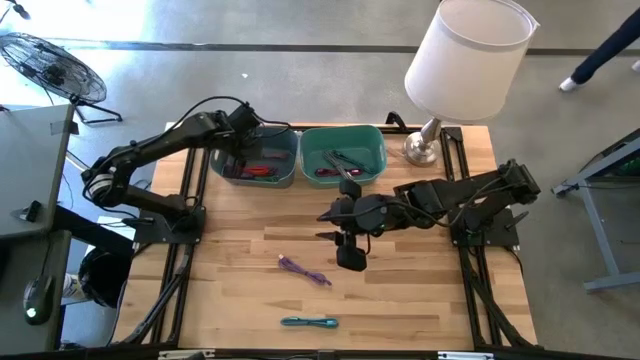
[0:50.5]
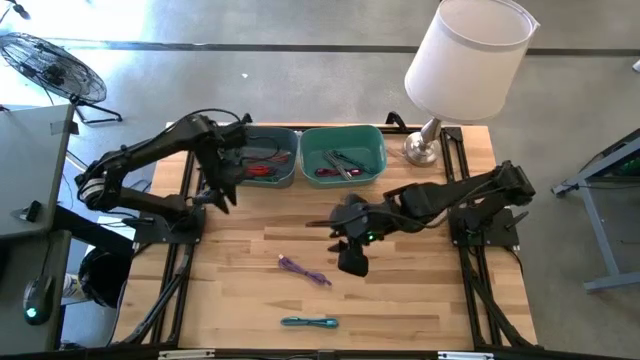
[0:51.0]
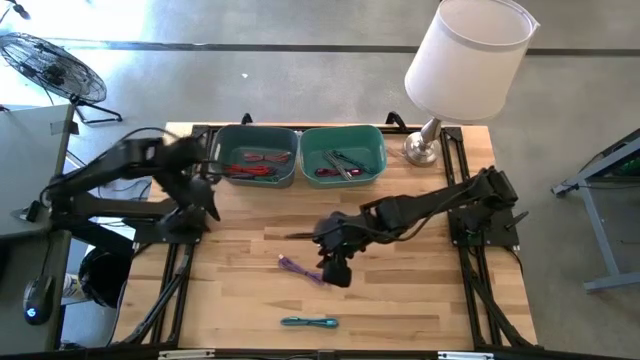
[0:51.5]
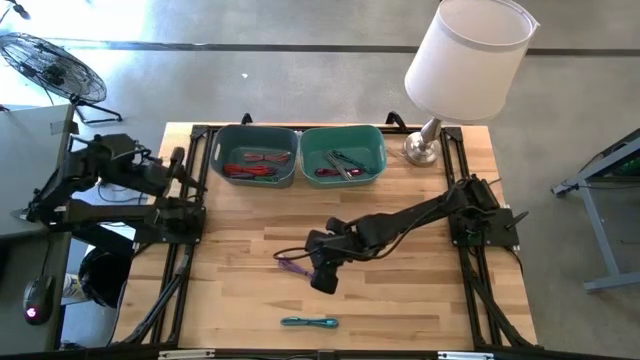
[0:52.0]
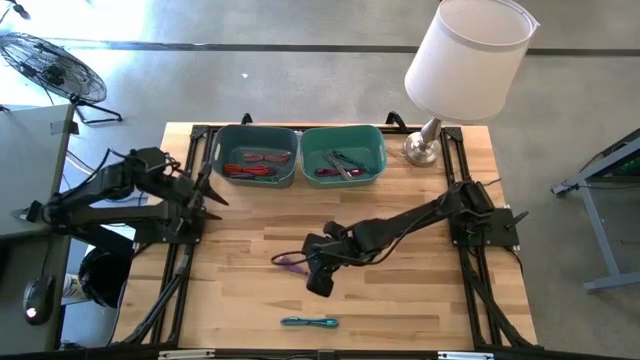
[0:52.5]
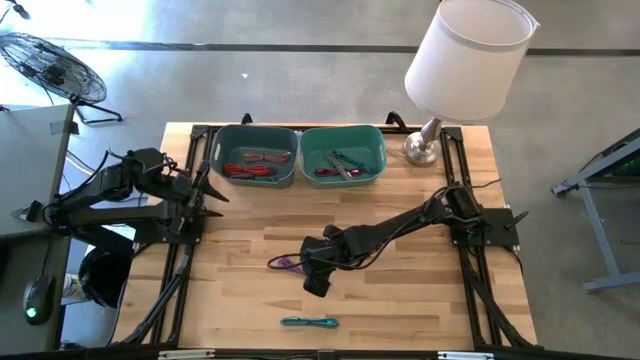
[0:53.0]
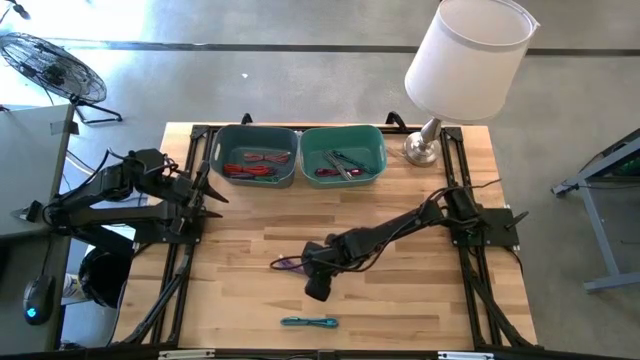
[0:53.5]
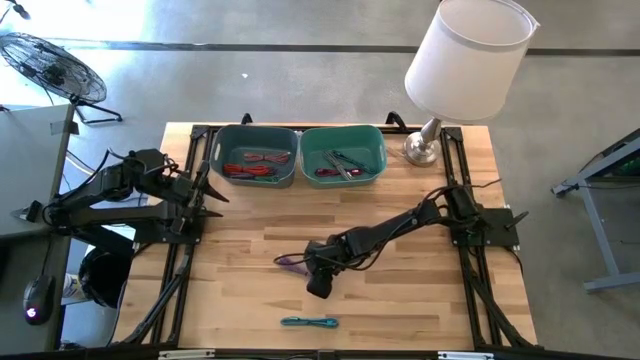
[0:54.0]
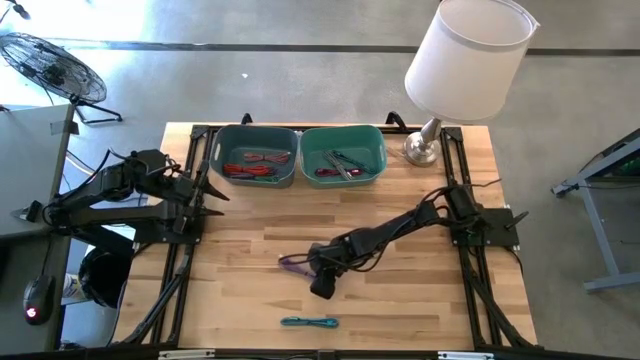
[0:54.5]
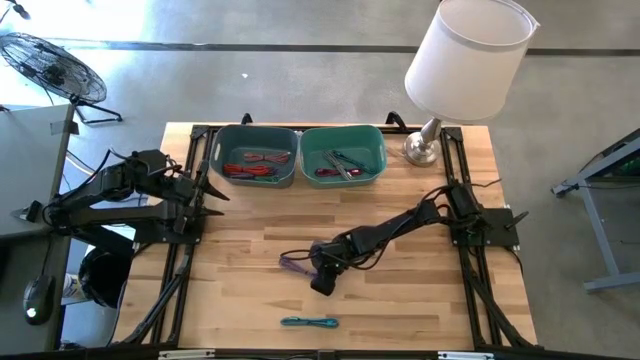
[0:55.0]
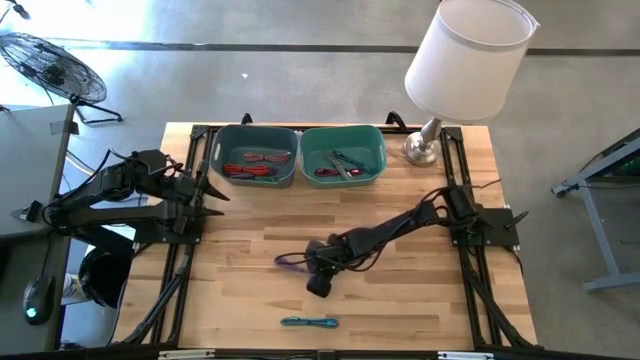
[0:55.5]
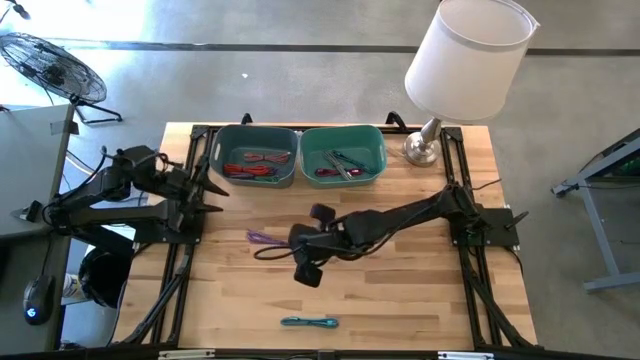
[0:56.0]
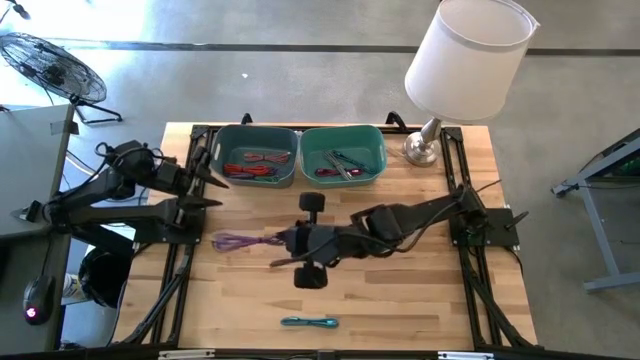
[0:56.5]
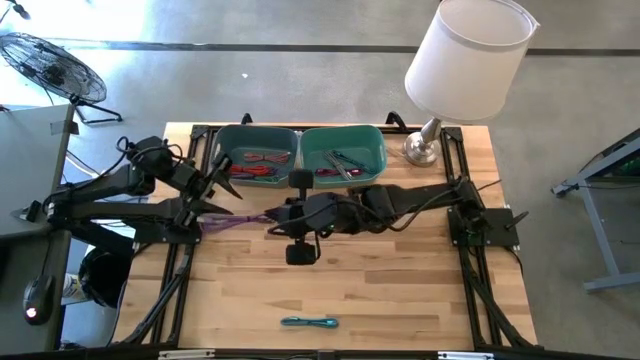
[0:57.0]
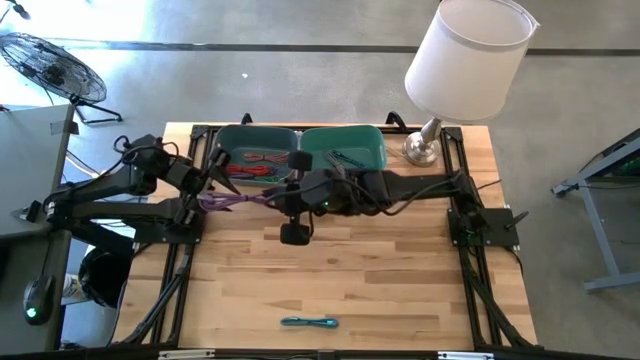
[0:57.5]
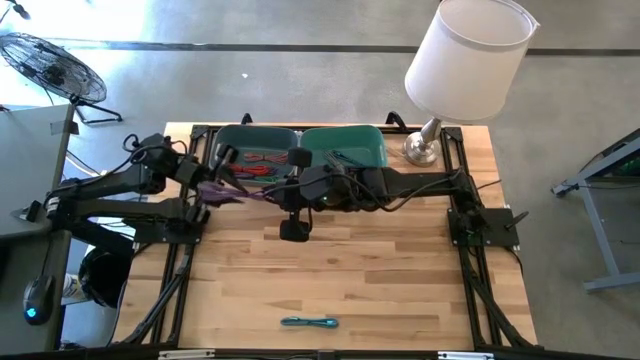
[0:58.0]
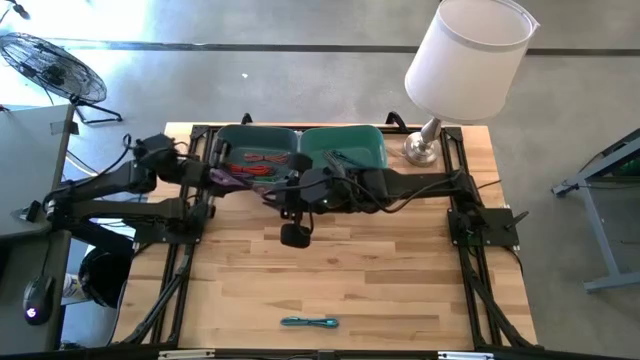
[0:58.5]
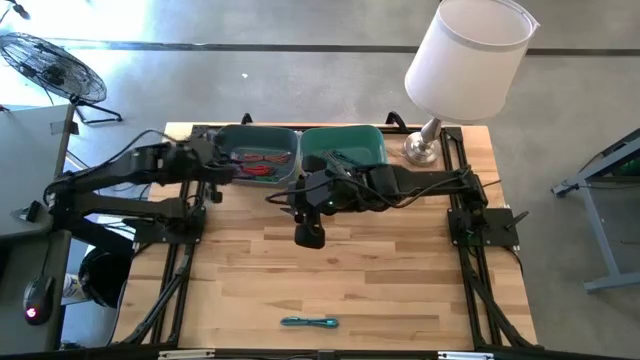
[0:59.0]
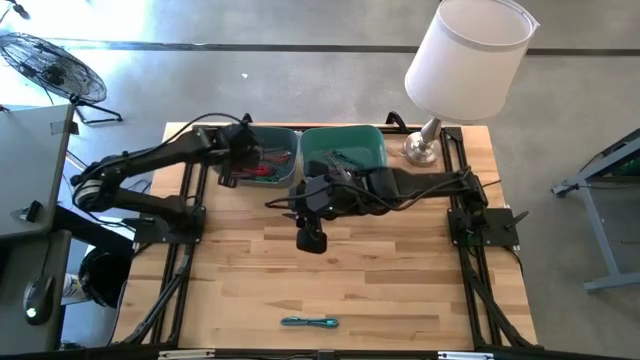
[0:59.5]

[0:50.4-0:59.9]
Task: Pick & Place USB Port
Put the purple charger cable into the blue bin

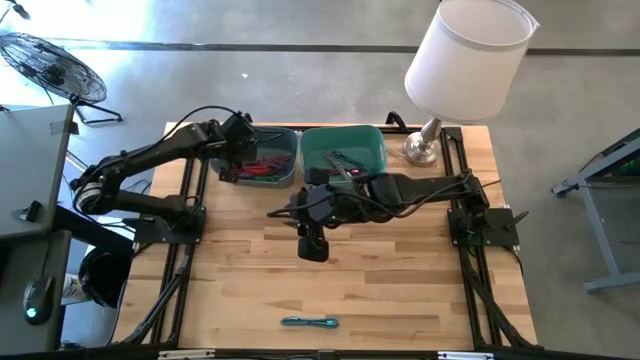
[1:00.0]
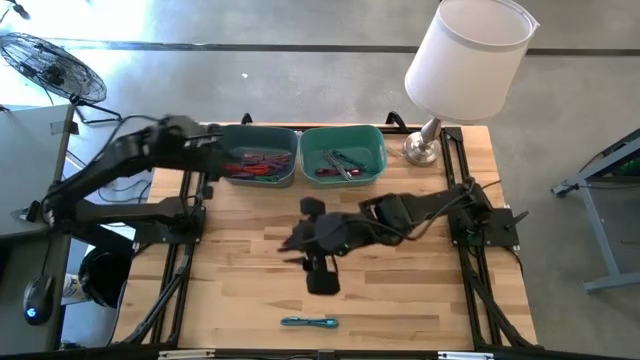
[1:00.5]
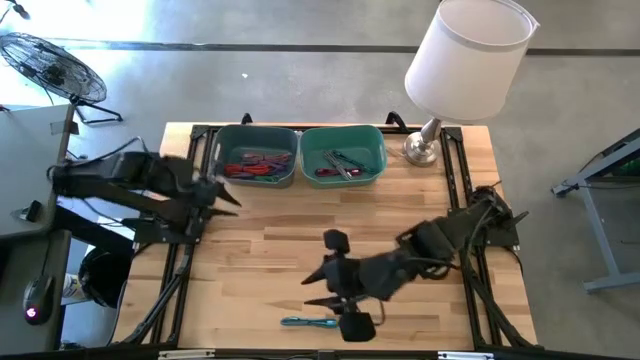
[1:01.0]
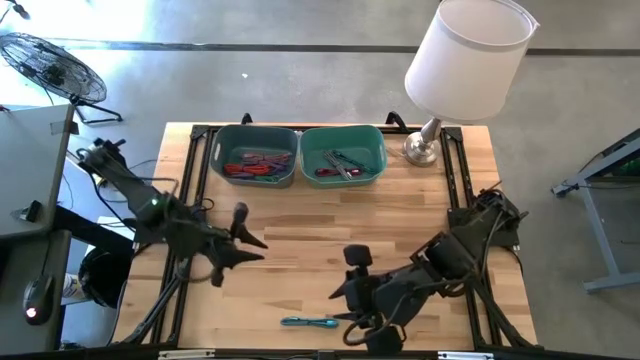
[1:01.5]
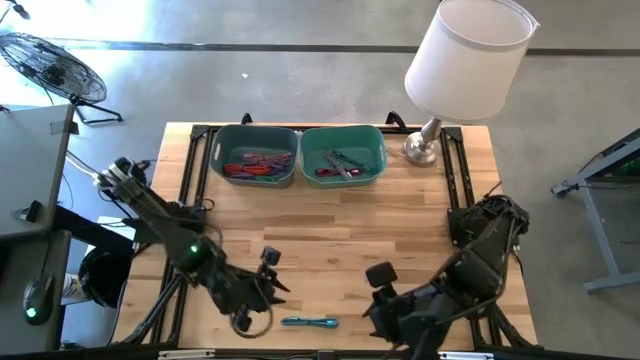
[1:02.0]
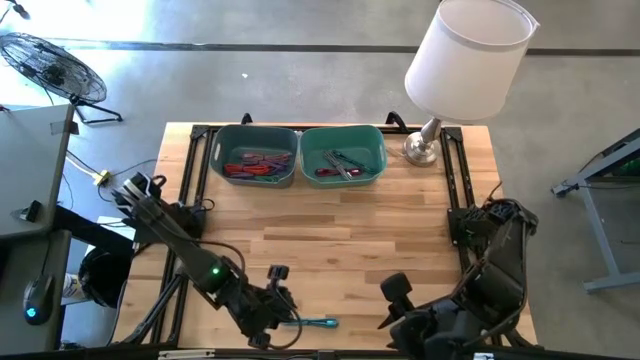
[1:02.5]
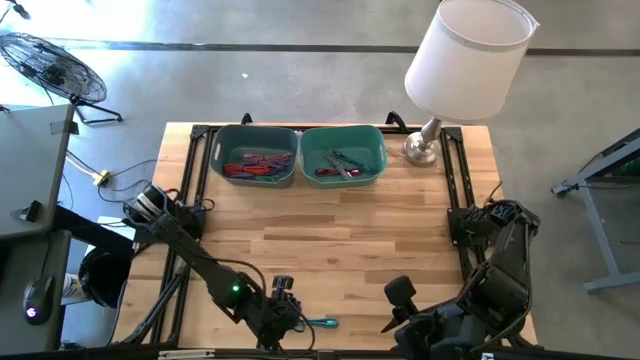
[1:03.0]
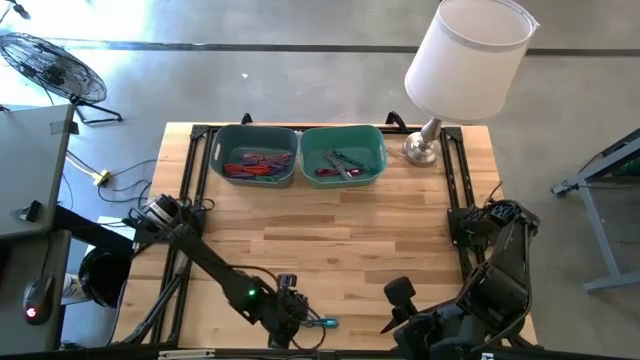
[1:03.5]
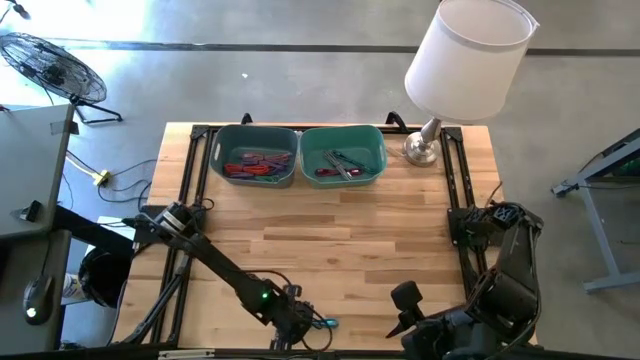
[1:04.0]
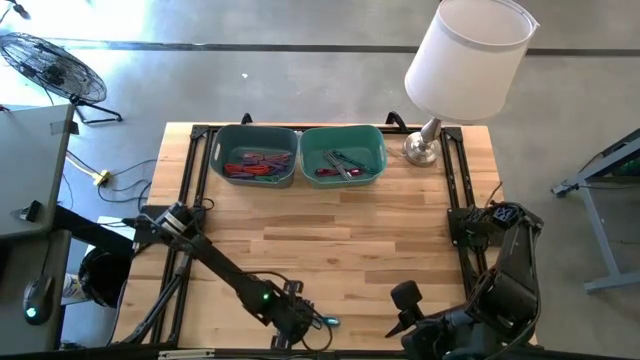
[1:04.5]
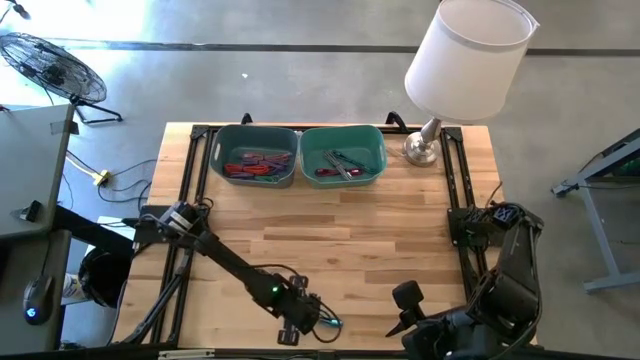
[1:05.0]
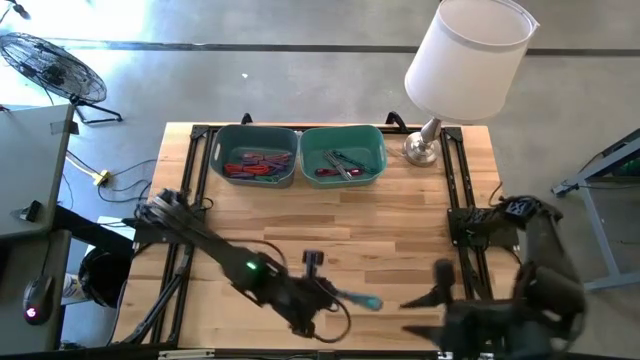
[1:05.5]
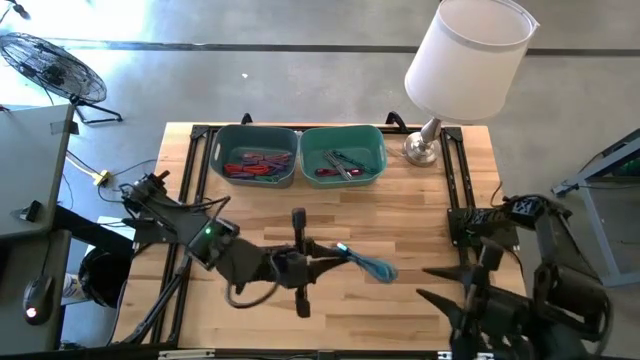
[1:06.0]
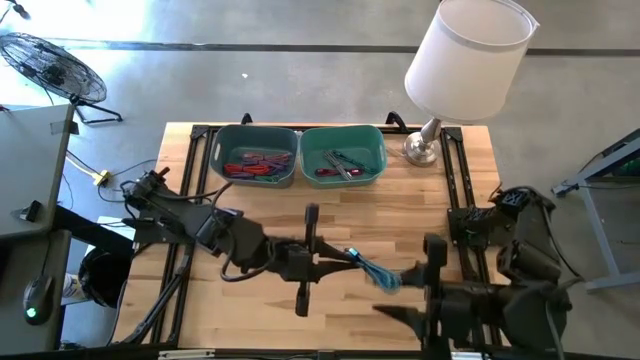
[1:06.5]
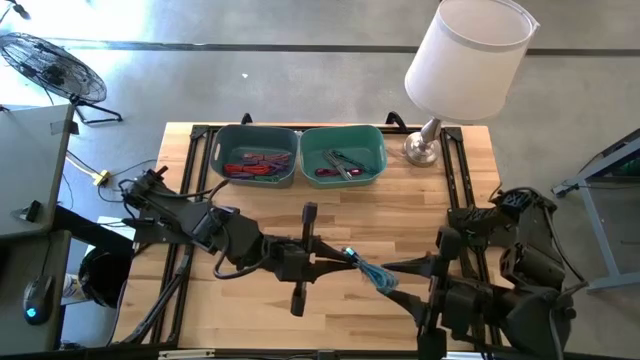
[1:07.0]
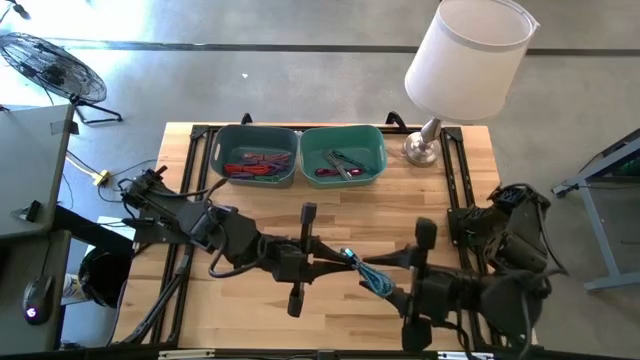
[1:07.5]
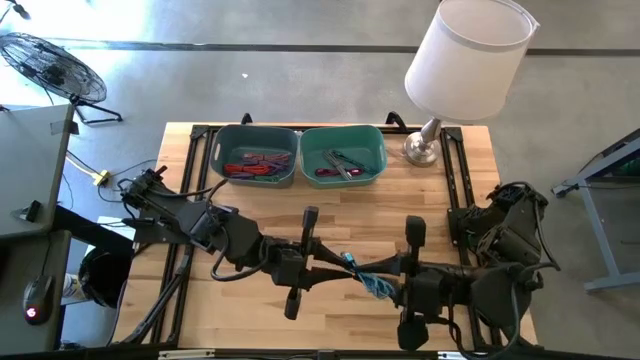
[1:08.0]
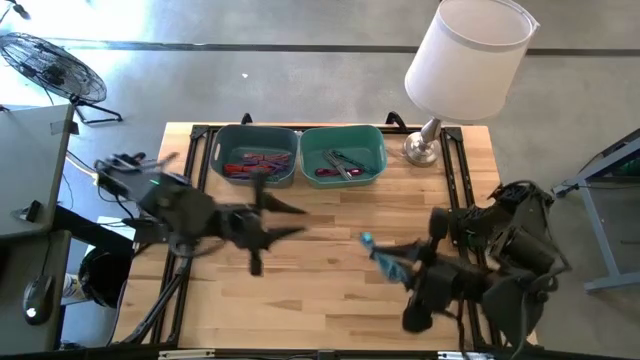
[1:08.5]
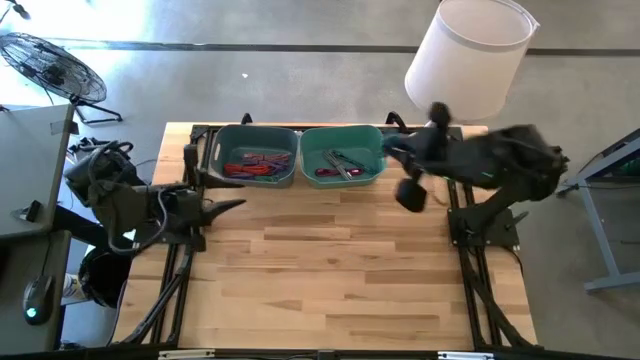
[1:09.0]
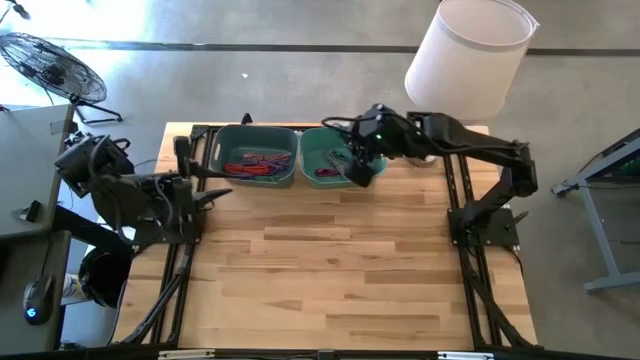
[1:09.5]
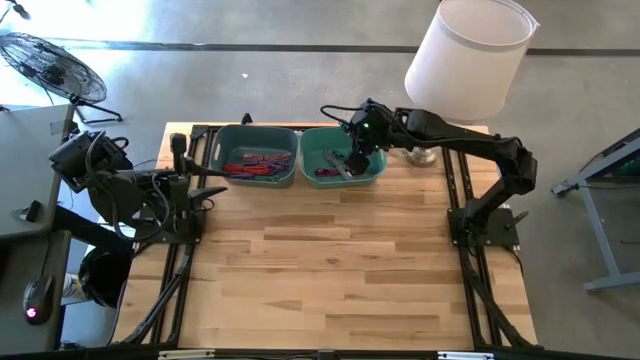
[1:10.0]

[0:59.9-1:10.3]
Put the black and blue charger cable into the green bin

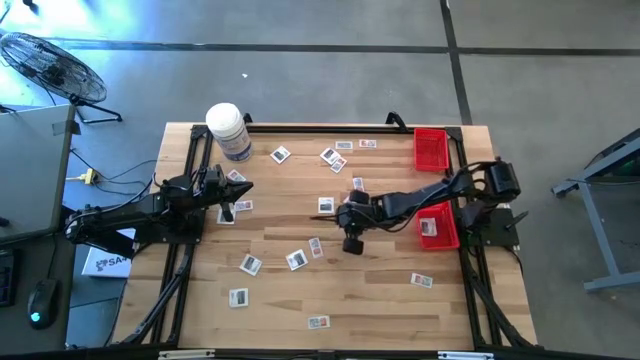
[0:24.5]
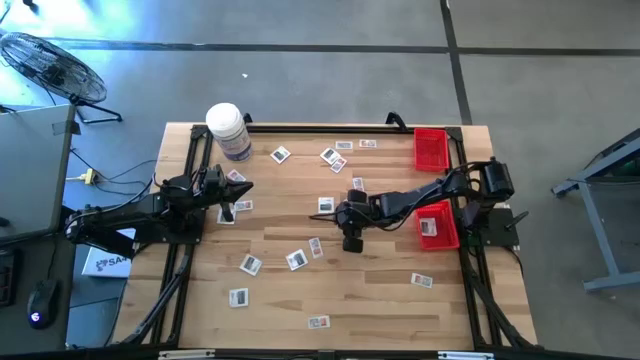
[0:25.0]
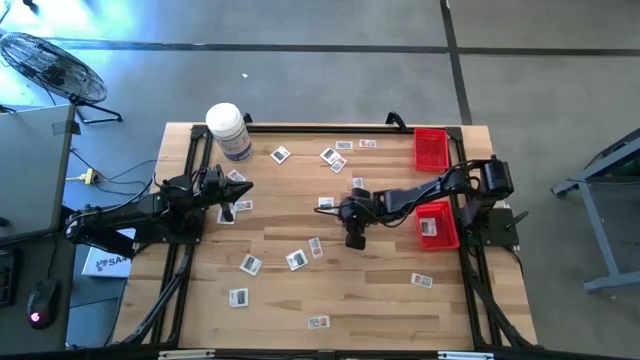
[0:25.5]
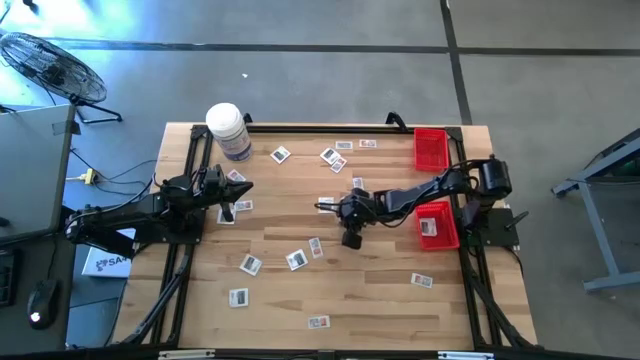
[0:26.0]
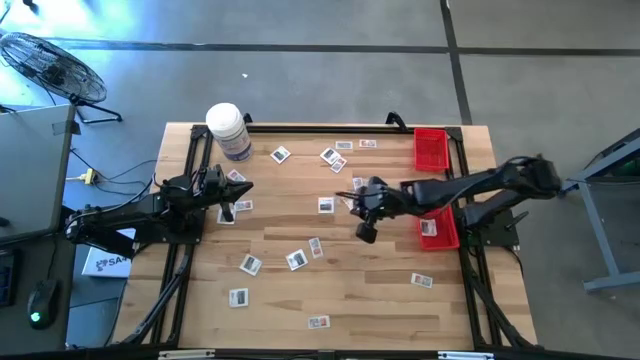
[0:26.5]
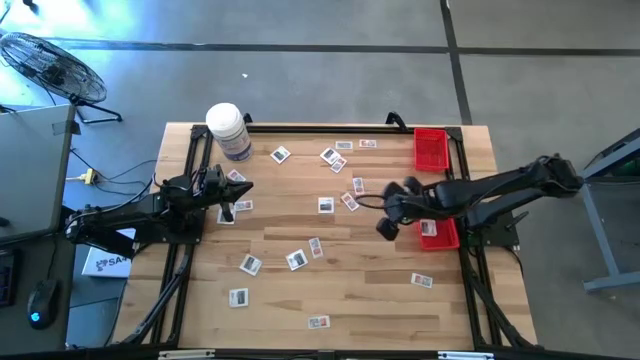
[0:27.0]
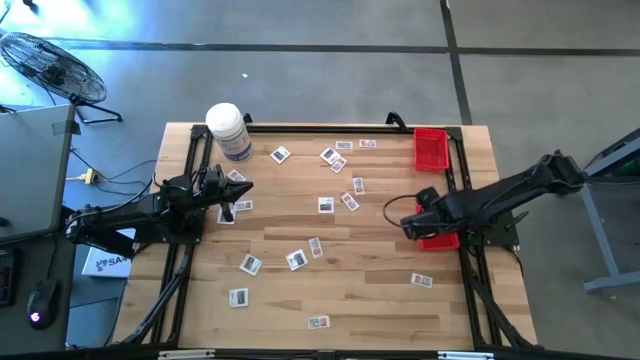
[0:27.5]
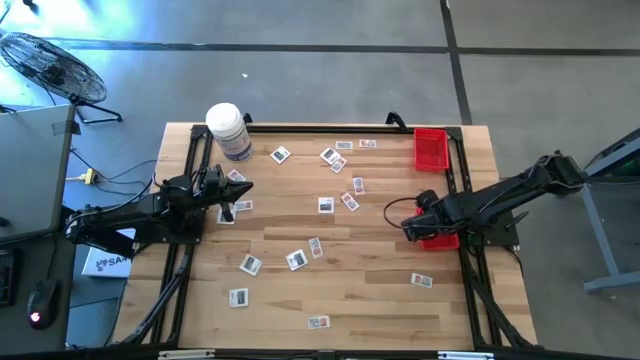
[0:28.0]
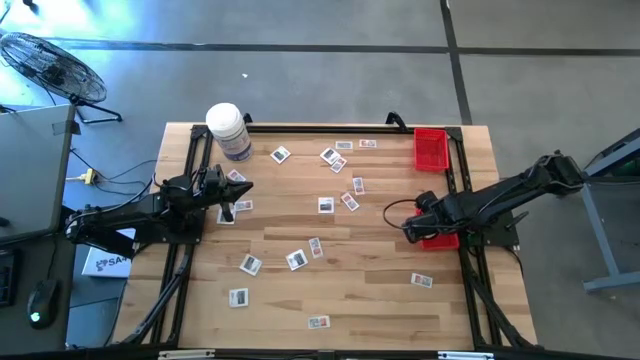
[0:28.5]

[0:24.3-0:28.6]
Task: Pick & Place First Aid Supplies
Put the towelette pack into the bottom basket
